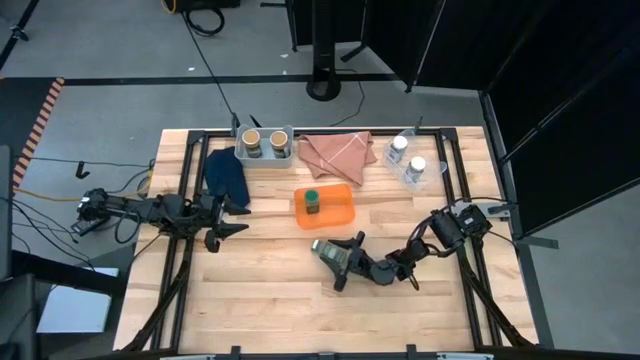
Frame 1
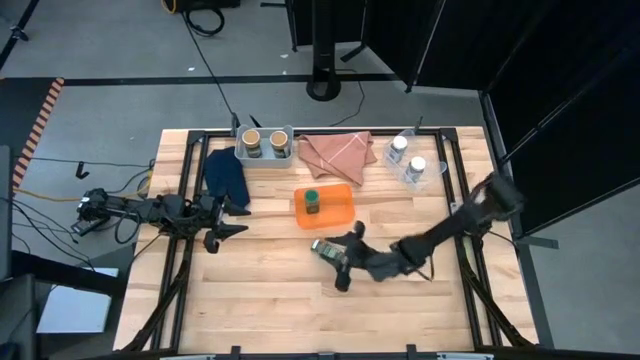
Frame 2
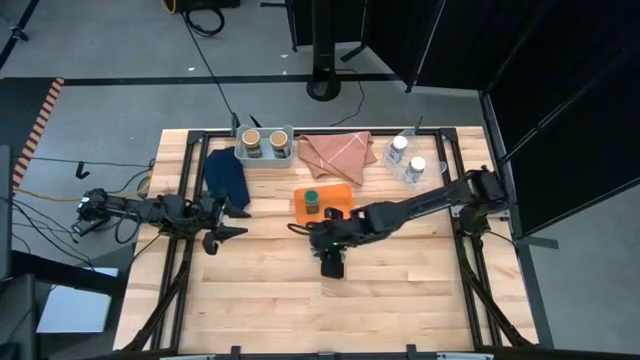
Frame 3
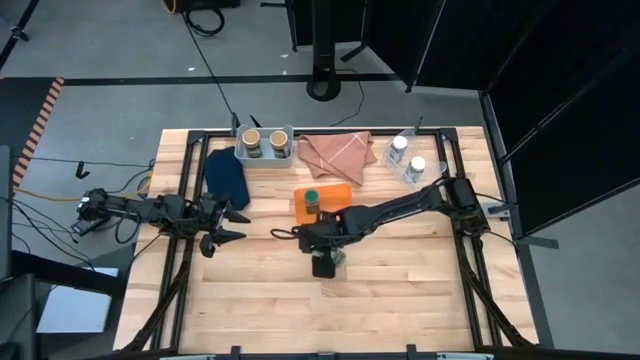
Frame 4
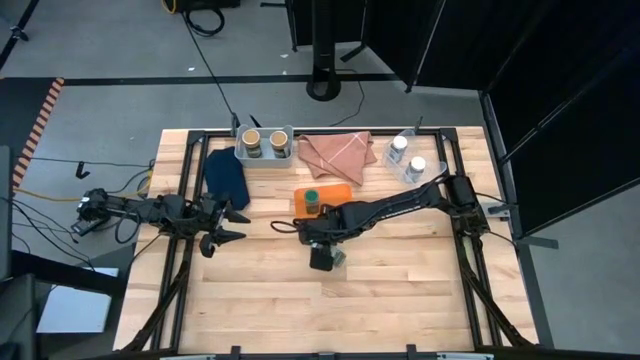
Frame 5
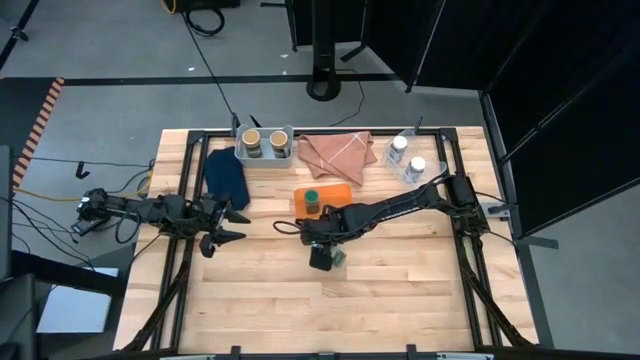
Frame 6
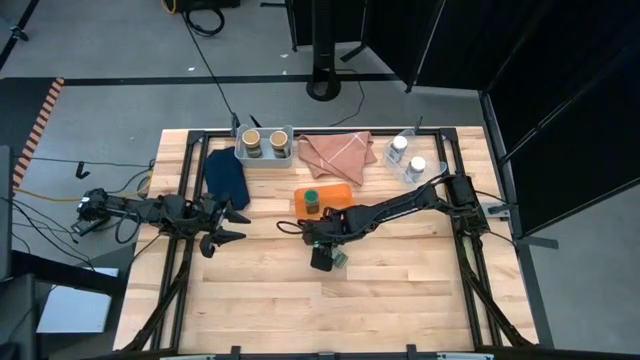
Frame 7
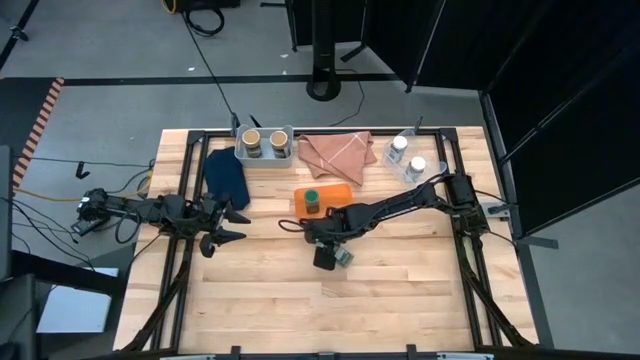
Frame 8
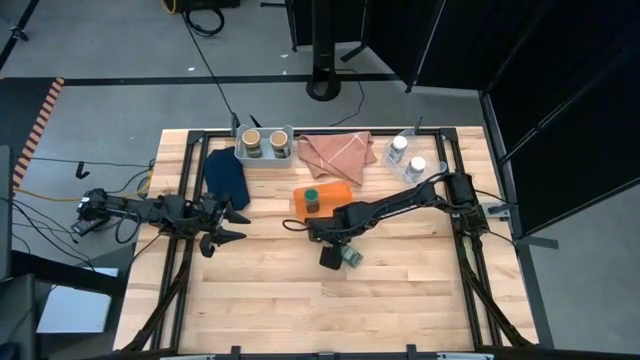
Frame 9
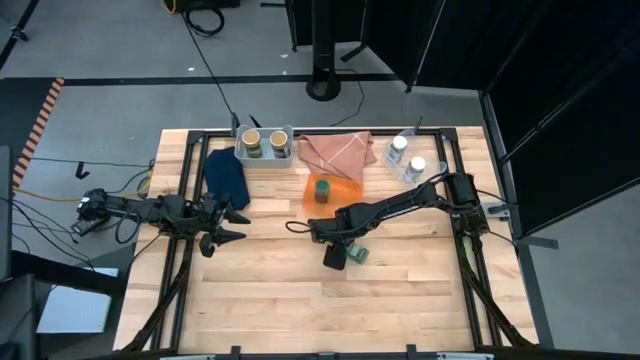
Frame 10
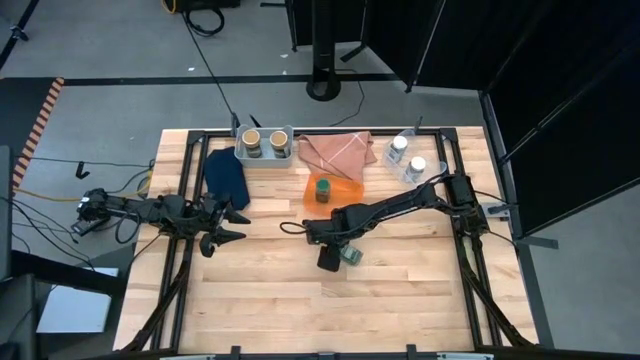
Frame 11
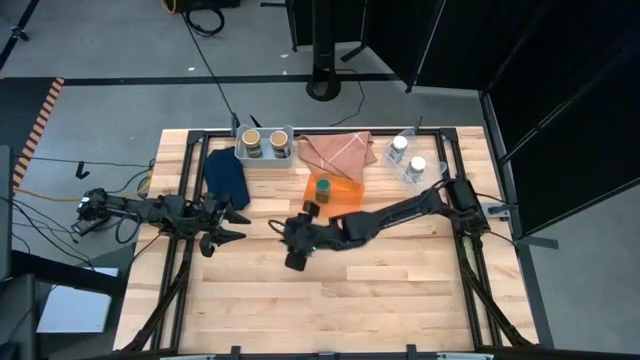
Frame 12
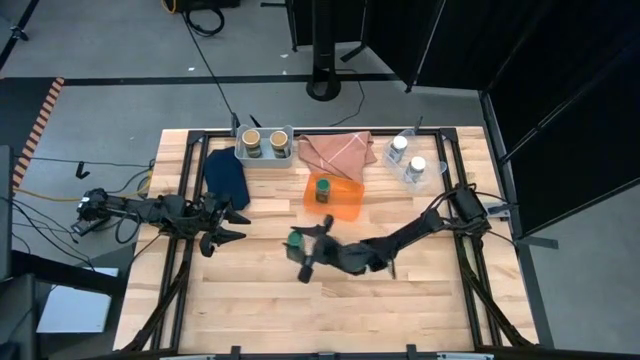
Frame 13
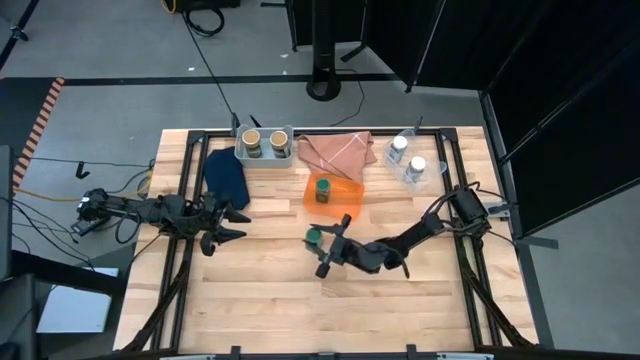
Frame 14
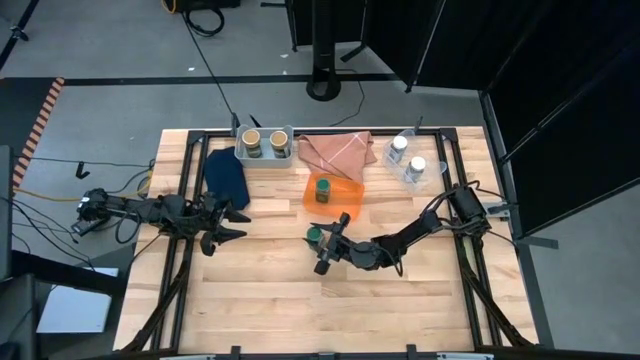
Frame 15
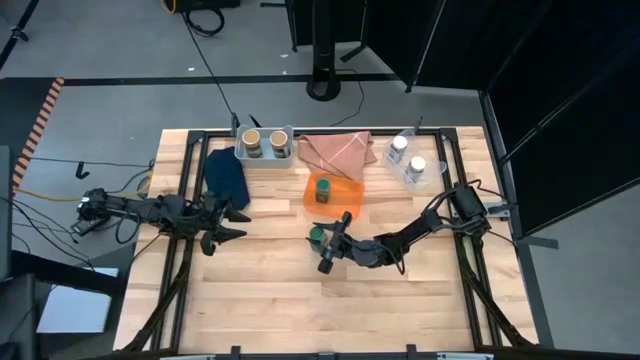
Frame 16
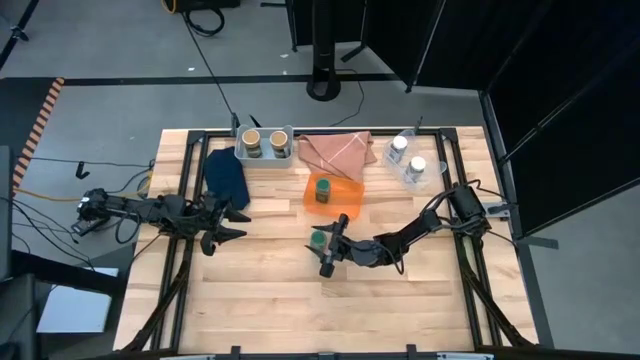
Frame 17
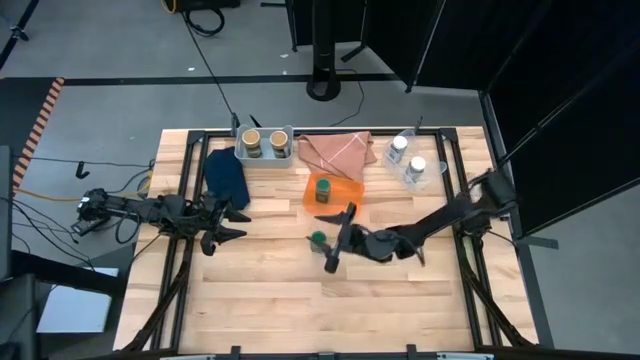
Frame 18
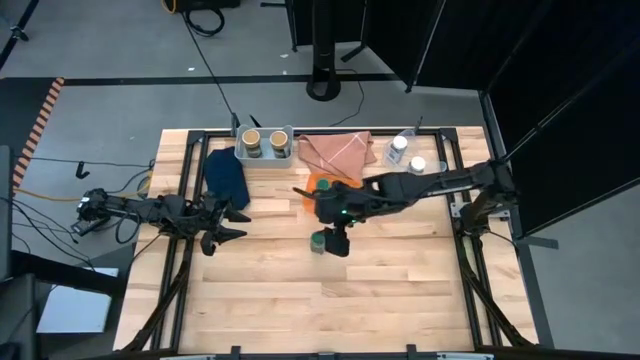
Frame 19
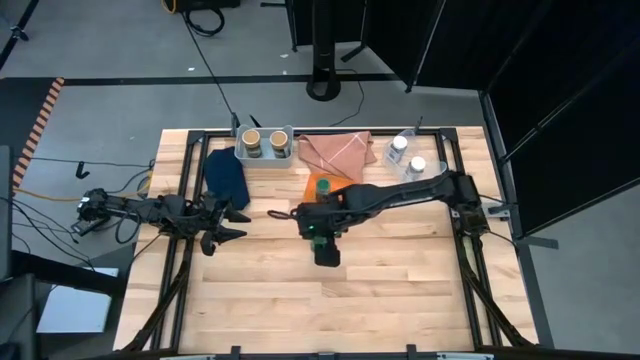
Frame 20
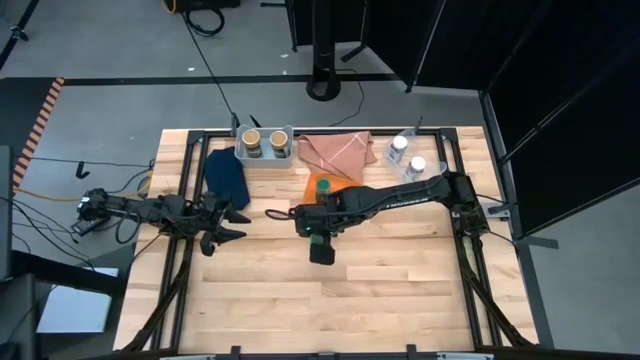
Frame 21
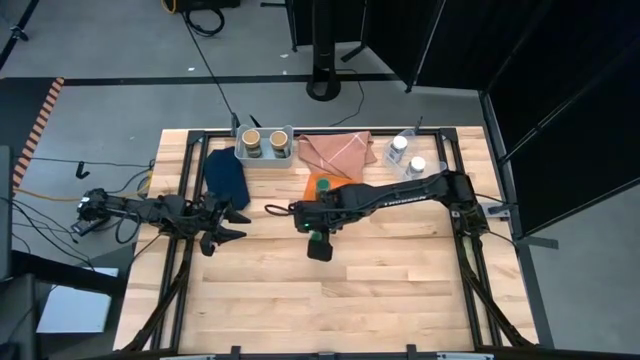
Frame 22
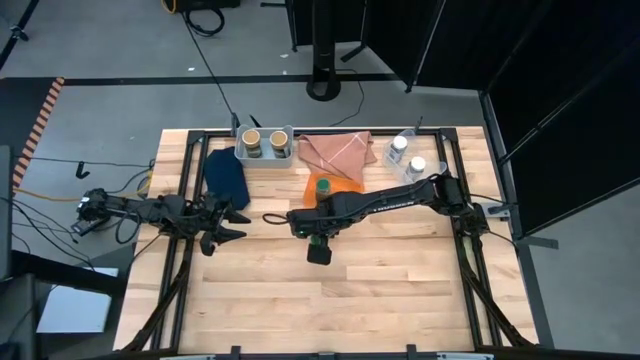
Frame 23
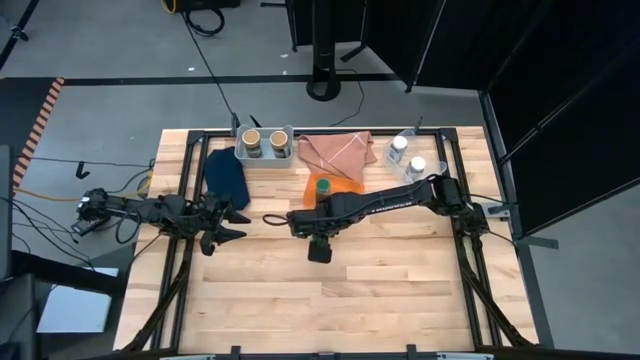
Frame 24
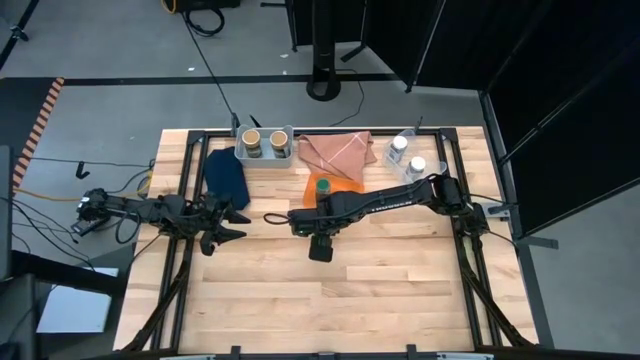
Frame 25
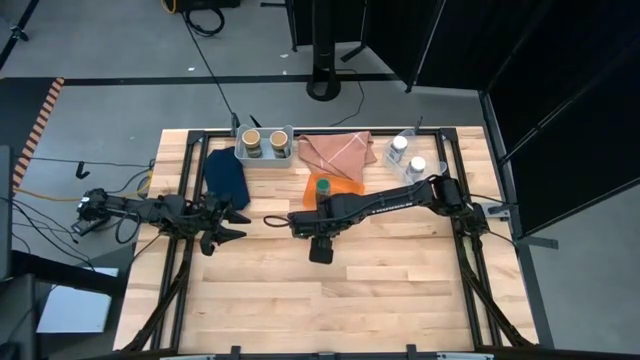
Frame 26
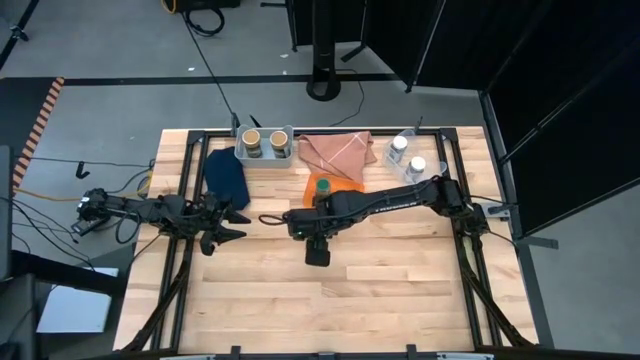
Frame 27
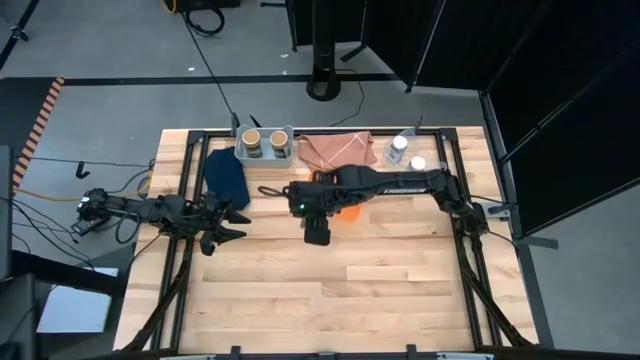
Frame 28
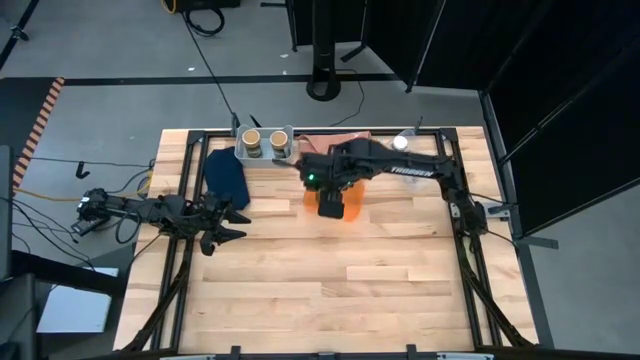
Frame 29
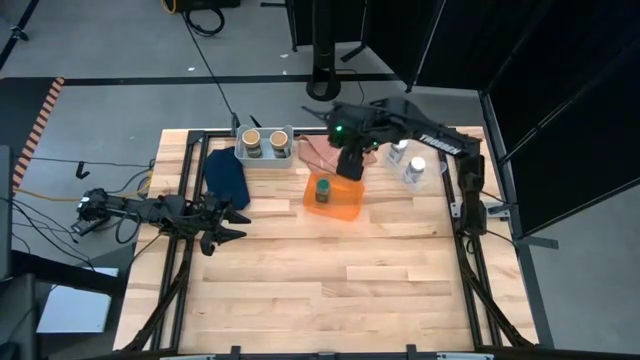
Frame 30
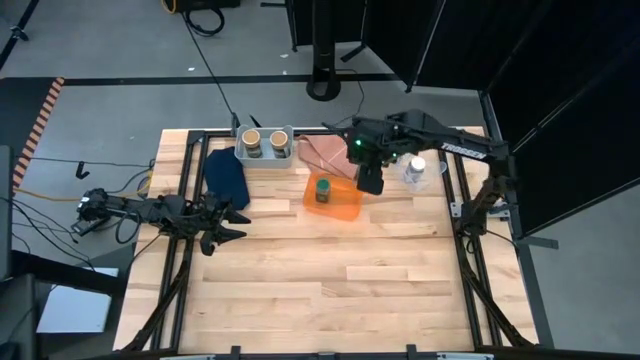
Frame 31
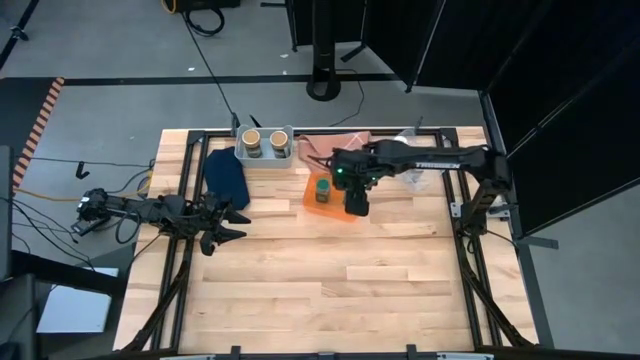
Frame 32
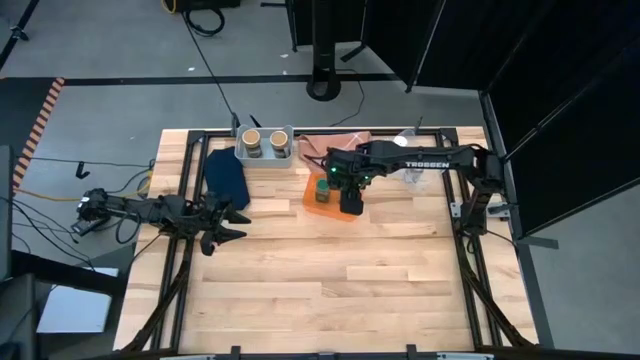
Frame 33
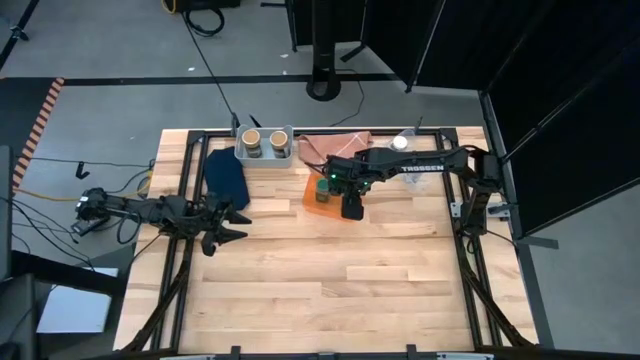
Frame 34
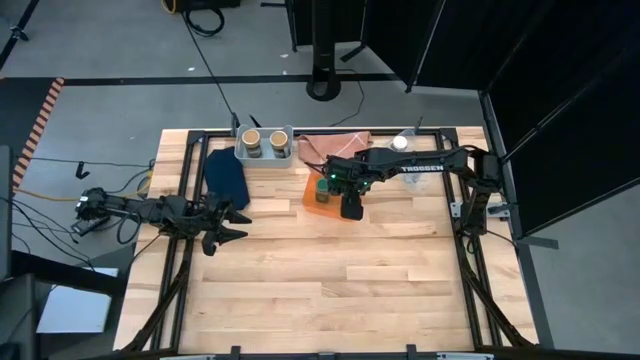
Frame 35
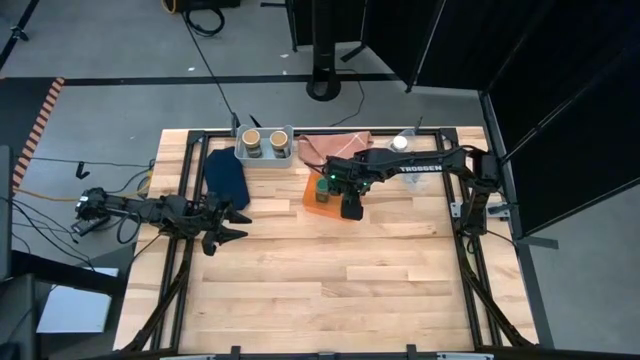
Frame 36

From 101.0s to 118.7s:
Task: Sort spices by type
Put the green seasoning bottle into the orange bin

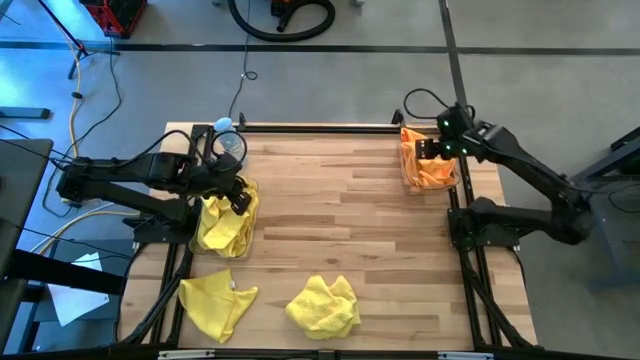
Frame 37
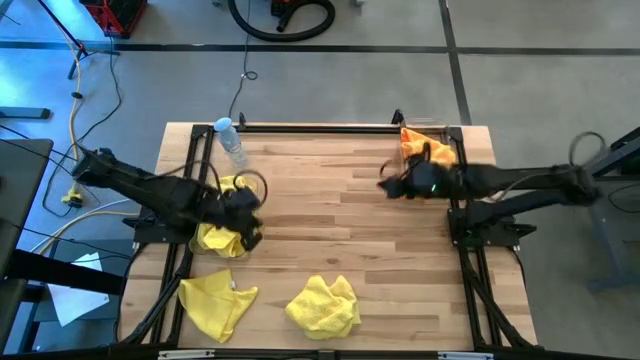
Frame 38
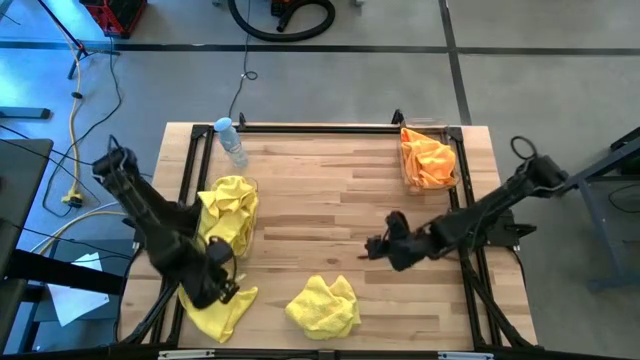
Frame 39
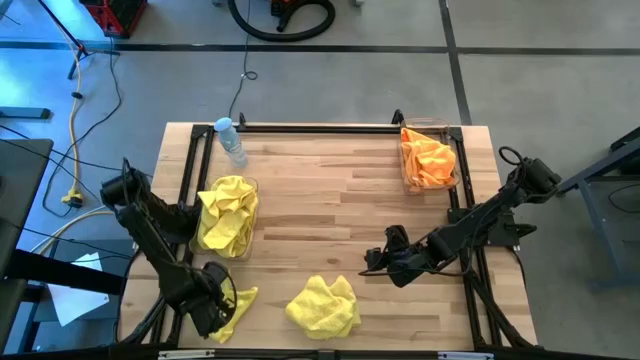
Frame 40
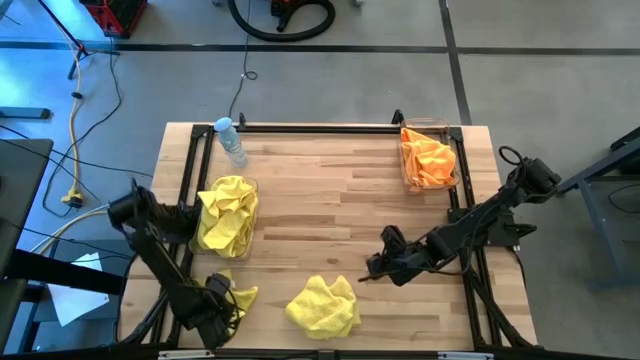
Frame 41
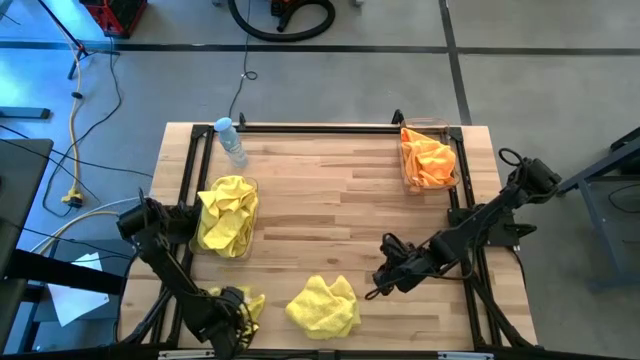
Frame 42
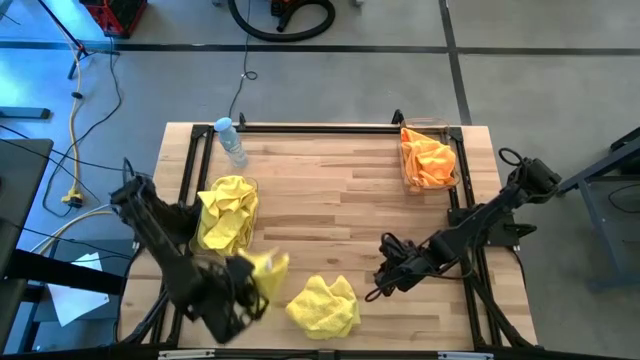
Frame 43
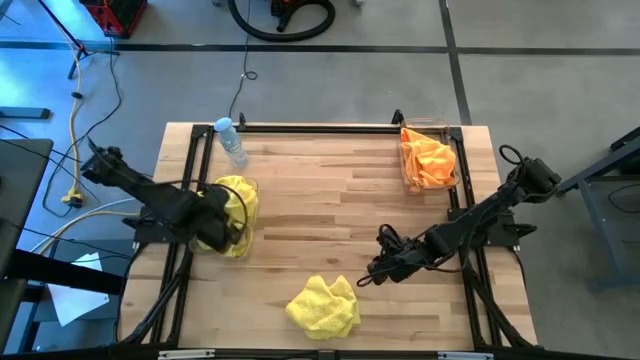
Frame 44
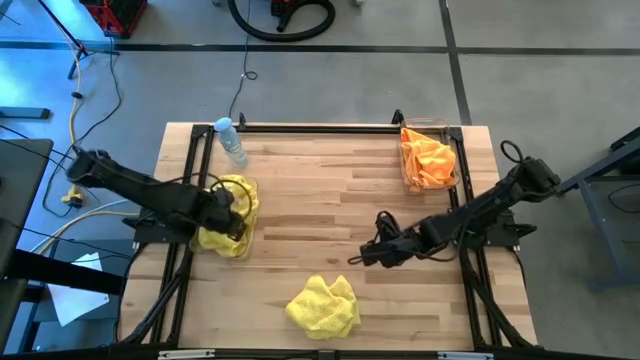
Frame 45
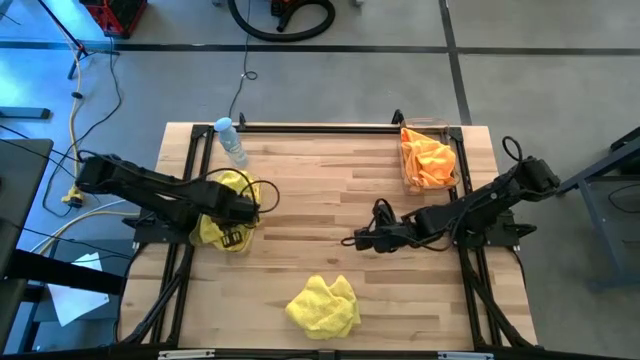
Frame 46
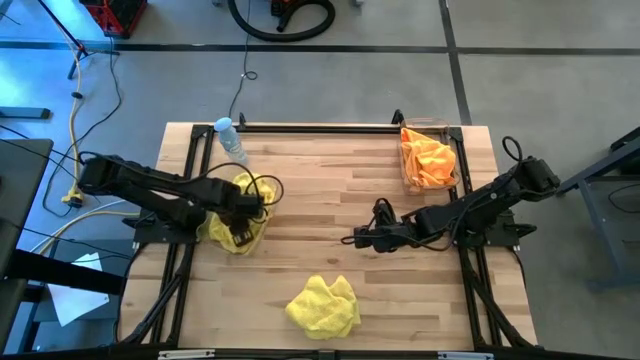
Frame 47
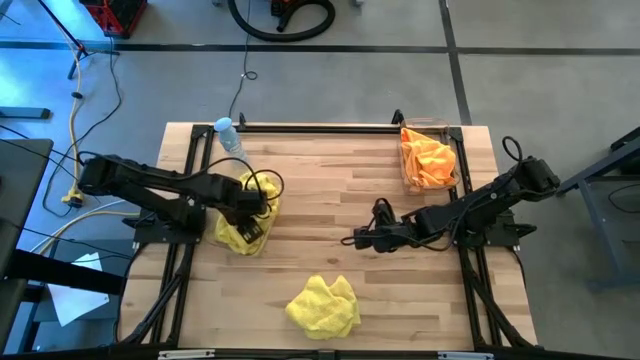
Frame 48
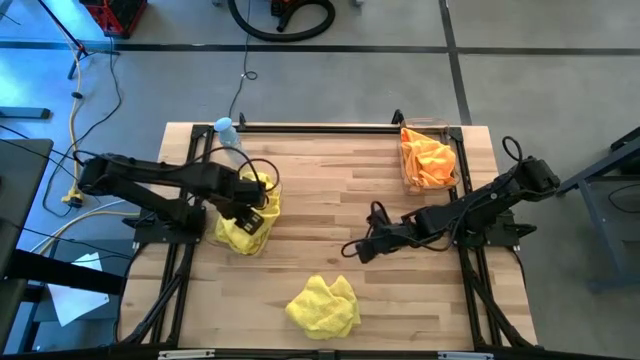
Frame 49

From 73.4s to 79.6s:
Task: Sort microfiber towel by color & place in baskets
Put the yellow microfiber cloth into the left transparent bin
